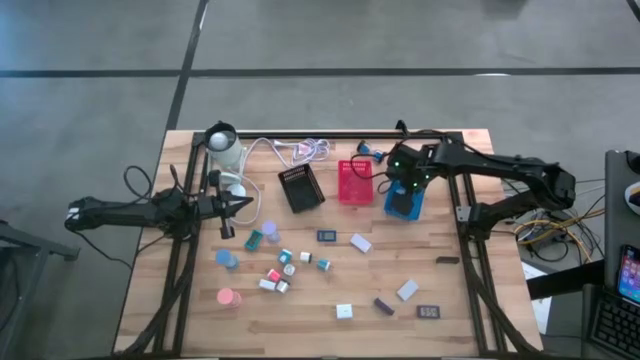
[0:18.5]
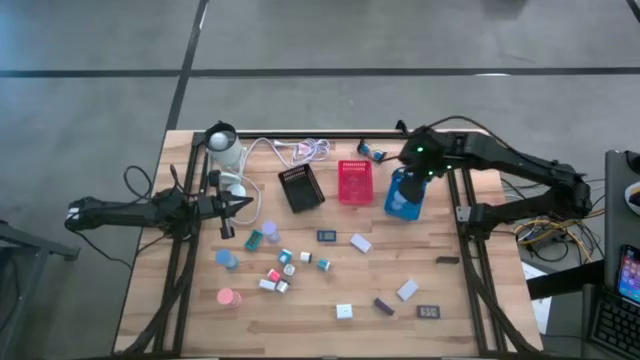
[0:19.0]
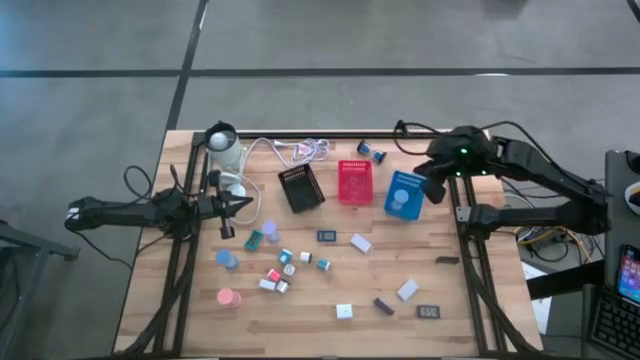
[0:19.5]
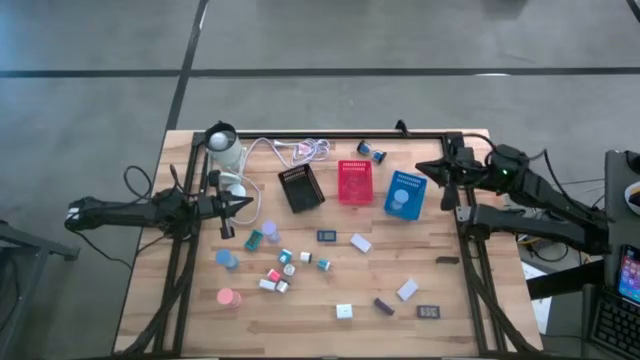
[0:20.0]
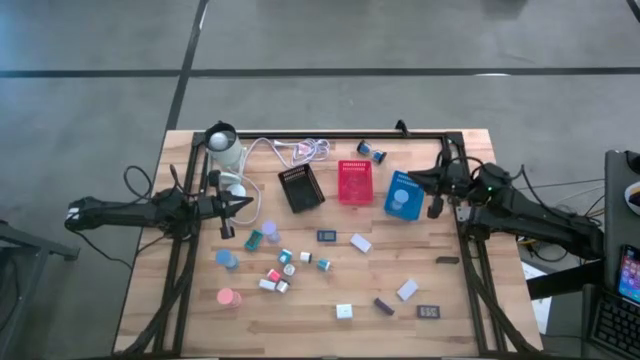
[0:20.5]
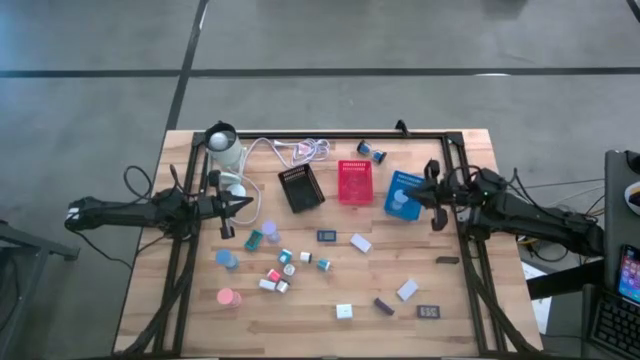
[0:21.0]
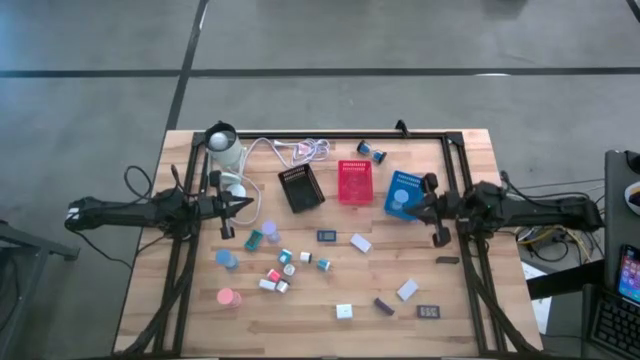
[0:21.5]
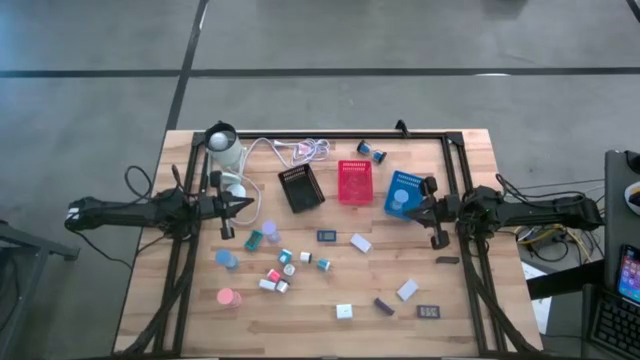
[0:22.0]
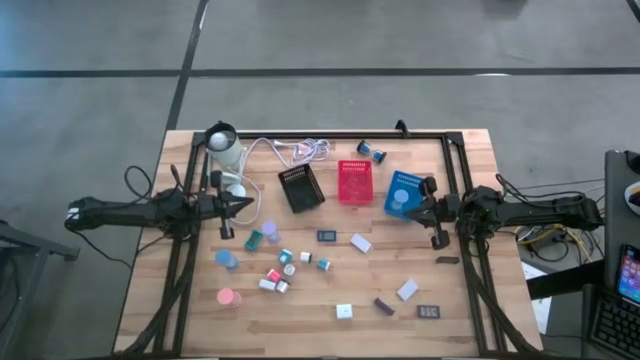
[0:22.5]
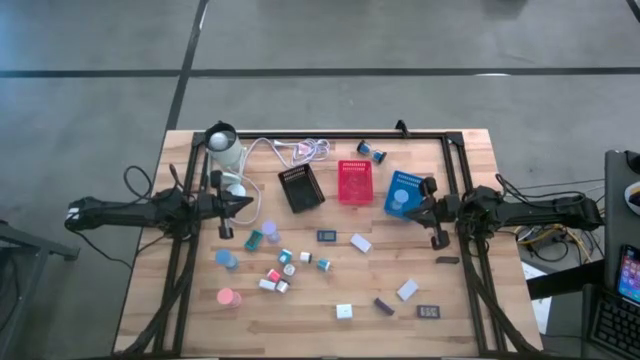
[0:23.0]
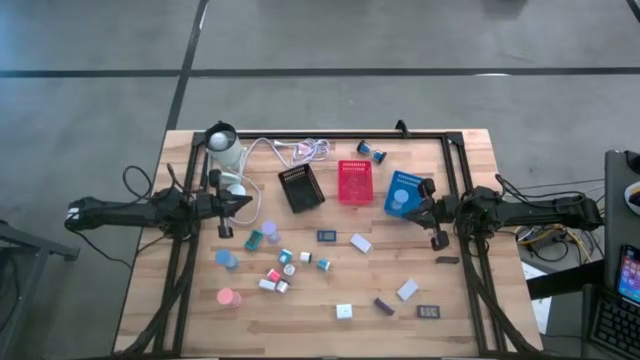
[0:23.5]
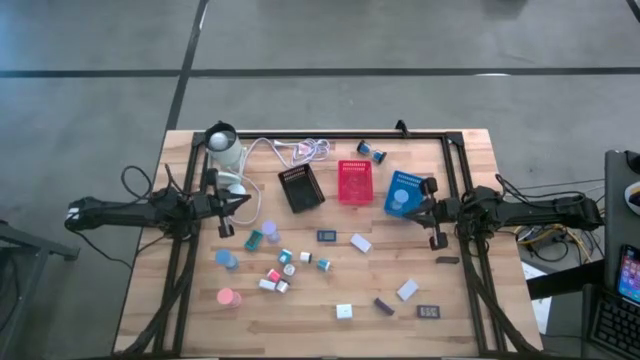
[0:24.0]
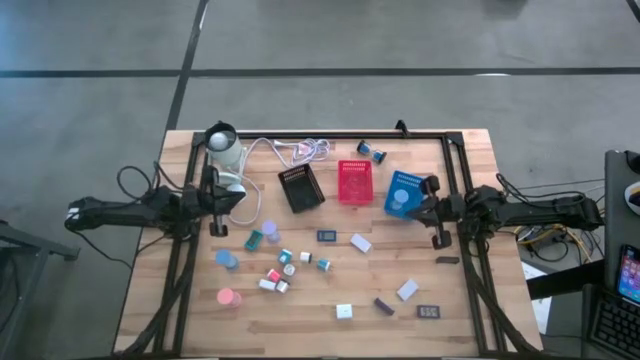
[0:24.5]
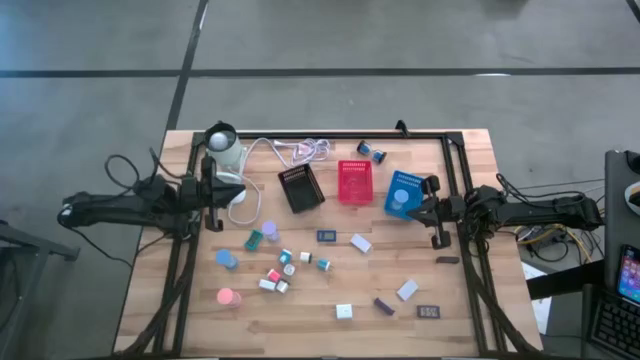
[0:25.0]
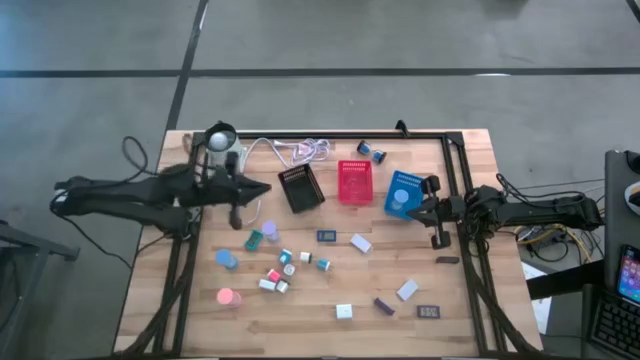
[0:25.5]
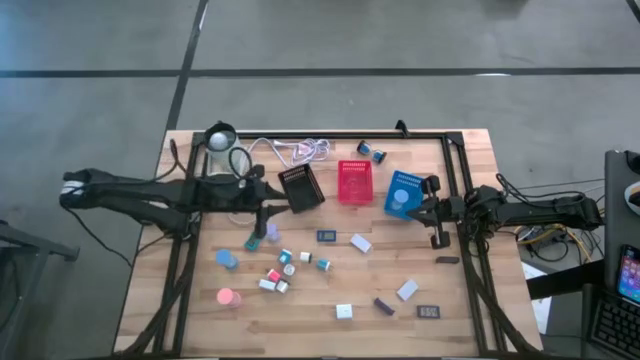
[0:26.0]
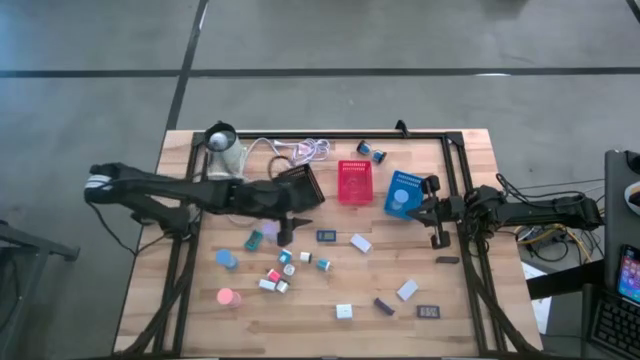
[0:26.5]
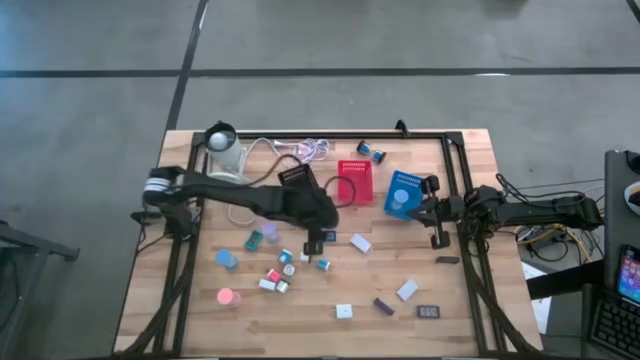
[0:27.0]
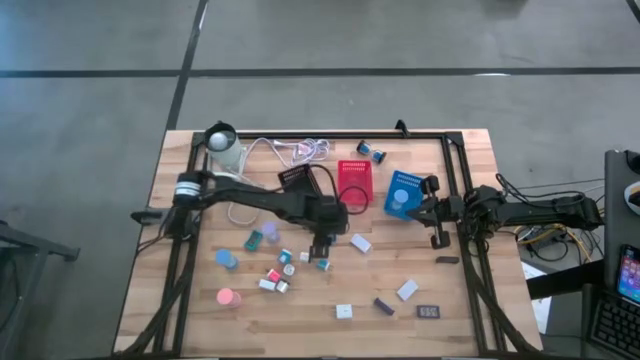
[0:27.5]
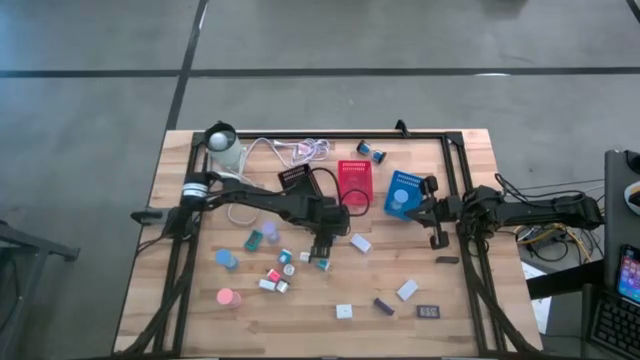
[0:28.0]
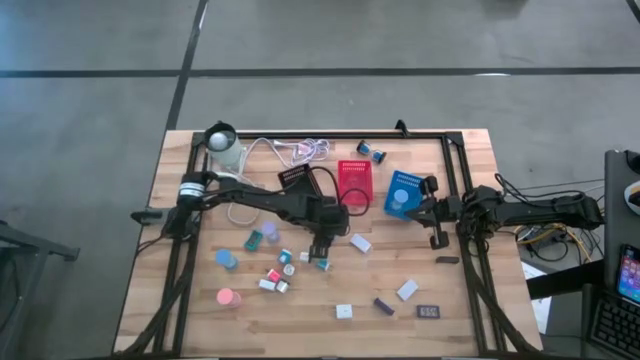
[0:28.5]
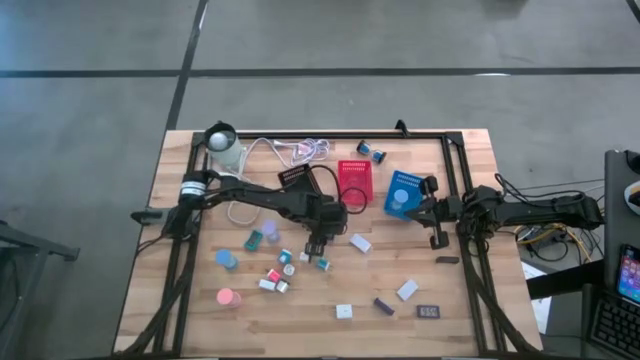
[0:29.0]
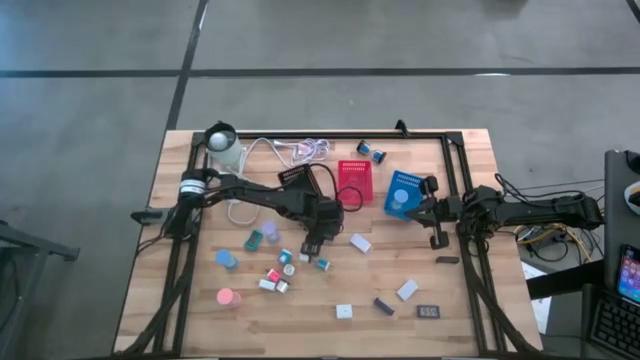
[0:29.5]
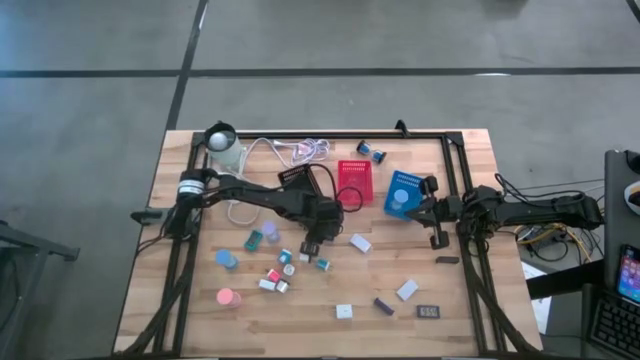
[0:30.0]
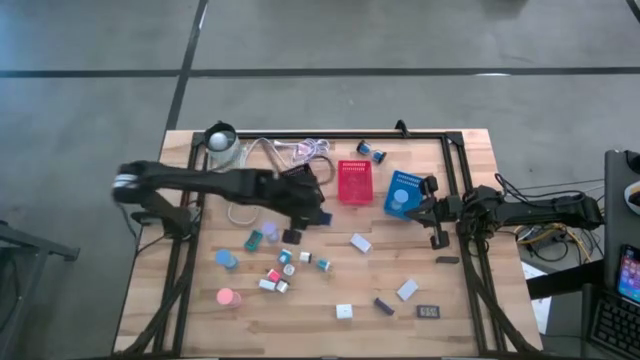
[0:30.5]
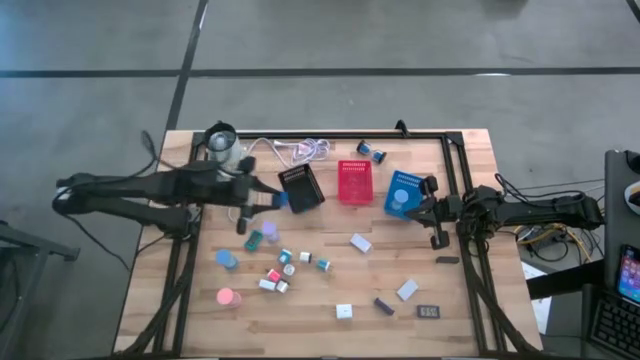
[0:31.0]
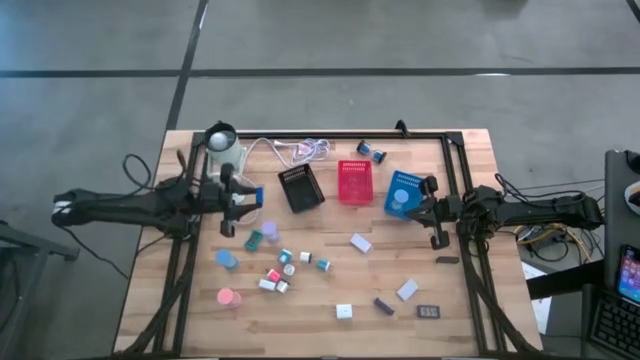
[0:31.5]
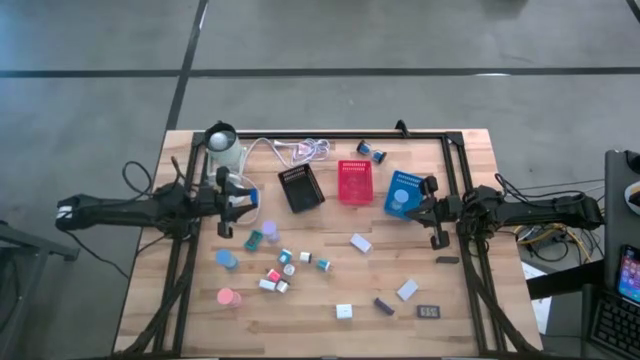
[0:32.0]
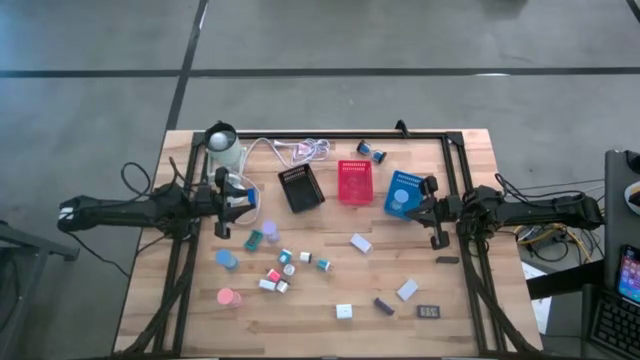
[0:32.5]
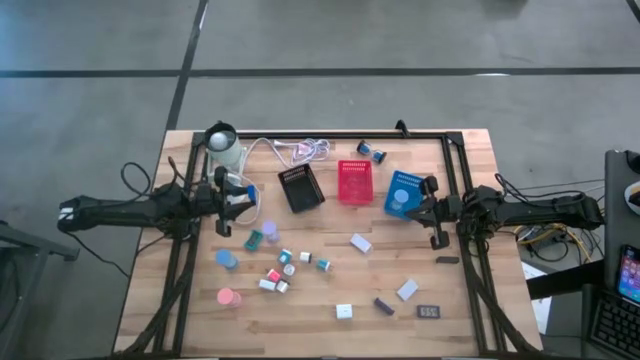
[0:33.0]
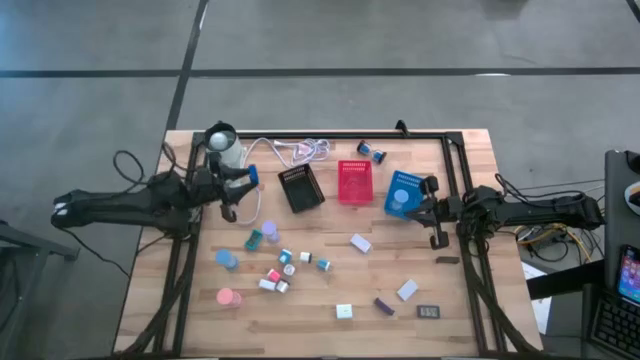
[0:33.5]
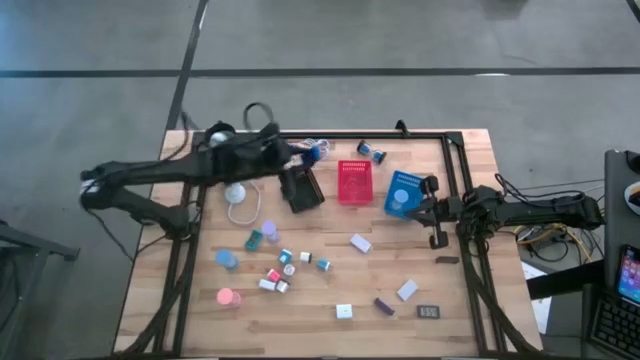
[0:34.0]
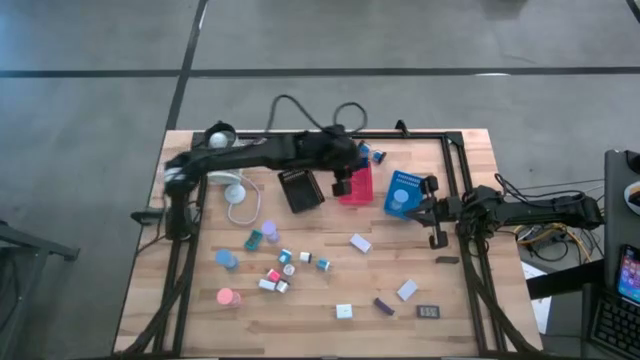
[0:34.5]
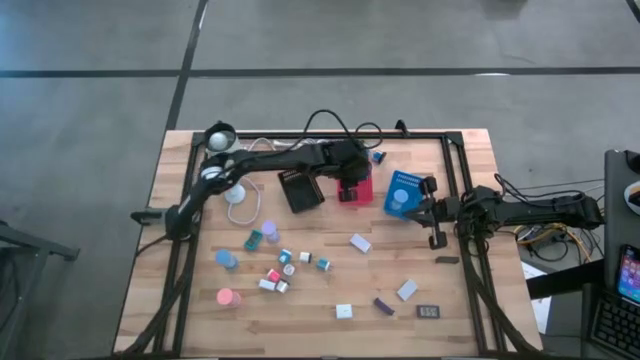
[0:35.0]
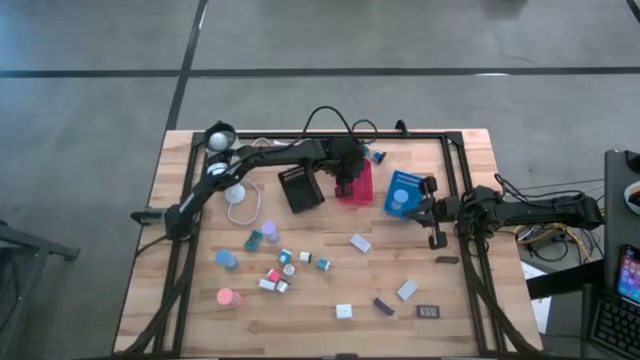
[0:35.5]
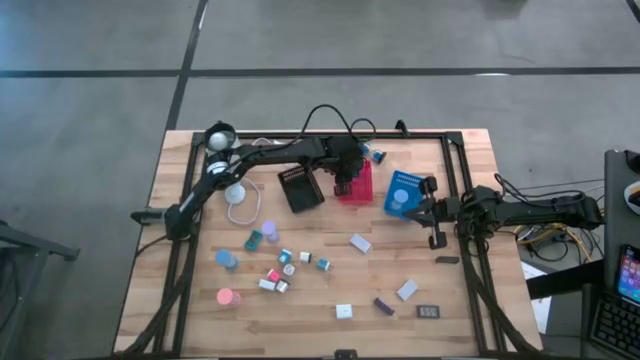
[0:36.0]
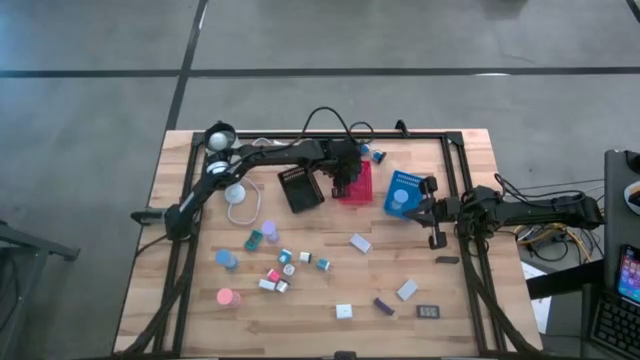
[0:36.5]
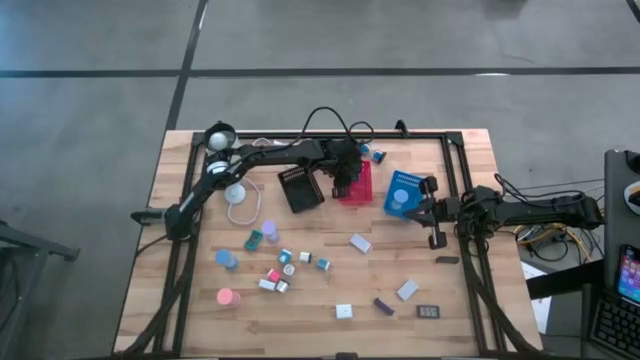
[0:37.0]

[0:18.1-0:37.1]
Task: Pick & Place Office items
Put the blue digital clock into the red bin

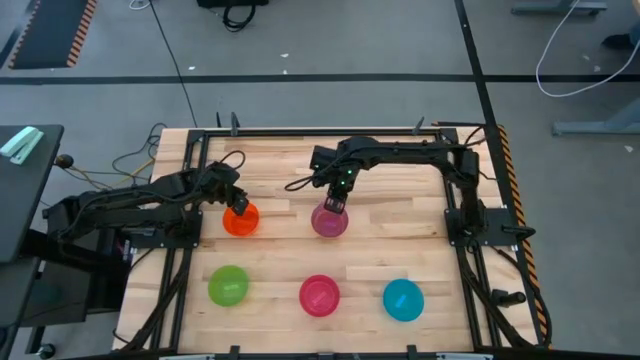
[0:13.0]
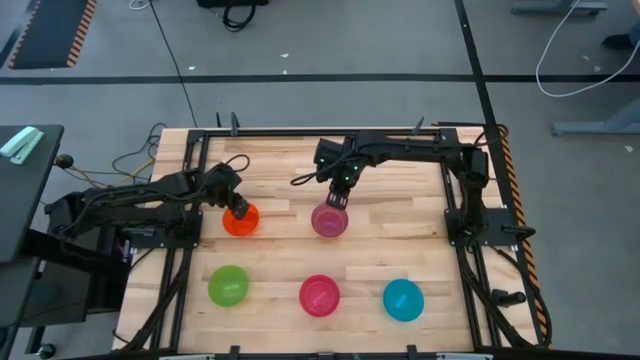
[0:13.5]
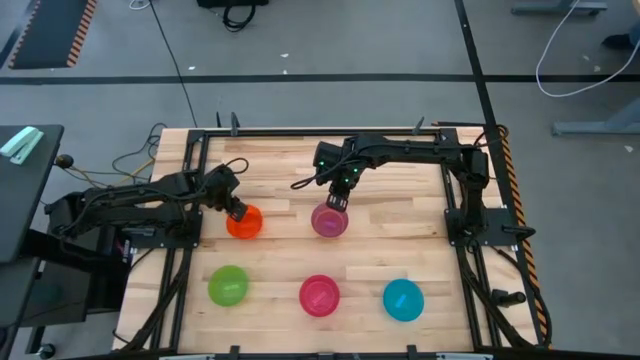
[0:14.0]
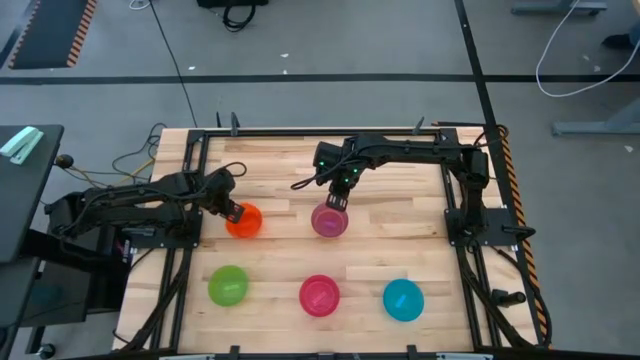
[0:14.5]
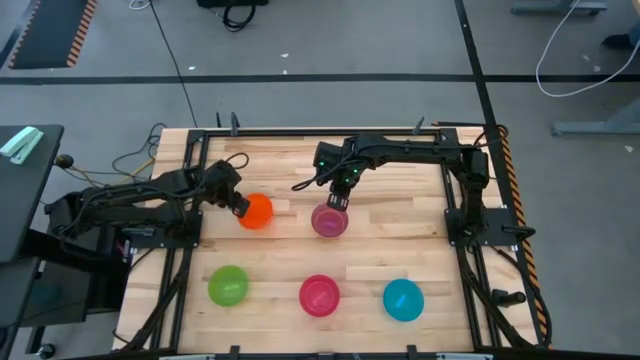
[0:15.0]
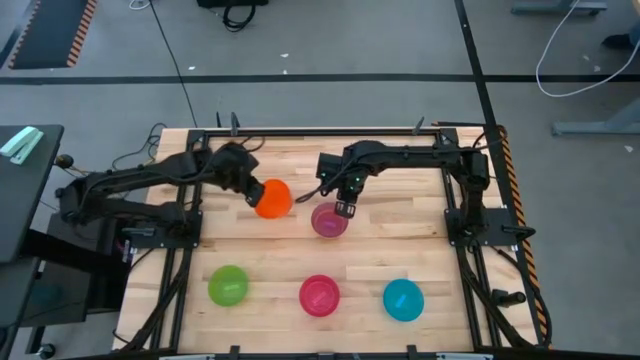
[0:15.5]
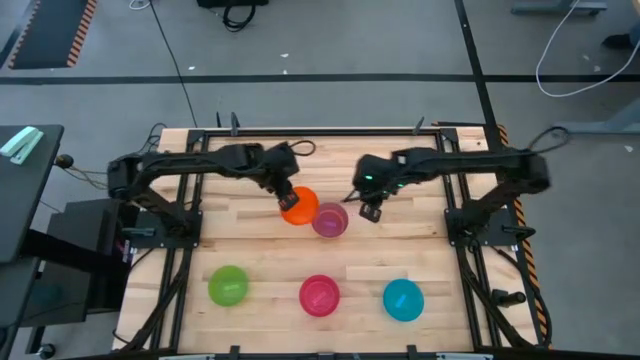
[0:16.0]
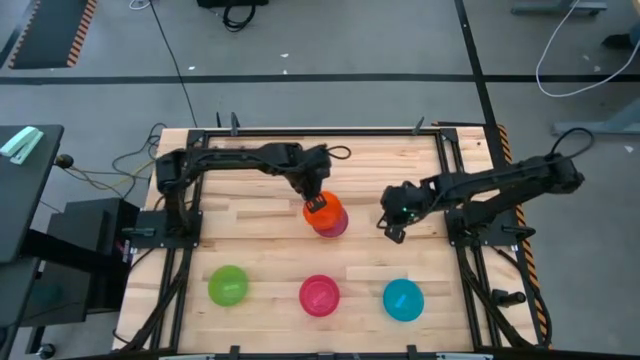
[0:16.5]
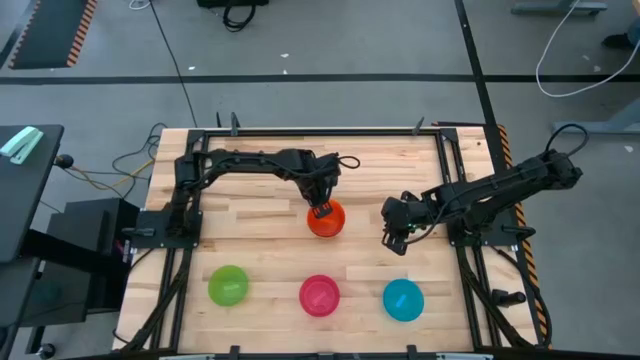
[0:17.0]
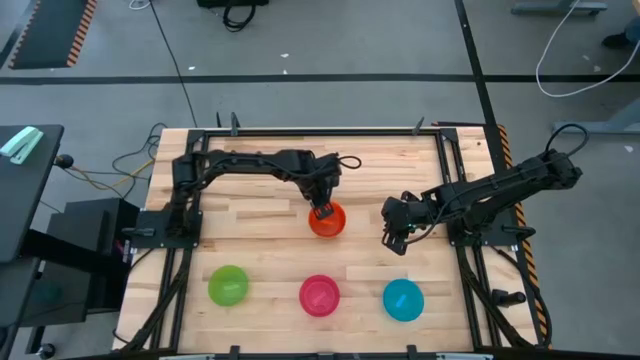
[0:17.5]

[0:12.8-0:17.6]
Task: Nest bowls inside each other
Stack the orange bowl onto the violet bowl
